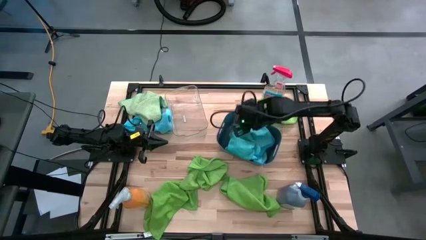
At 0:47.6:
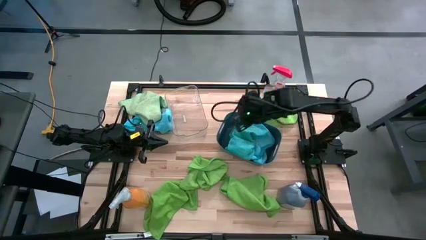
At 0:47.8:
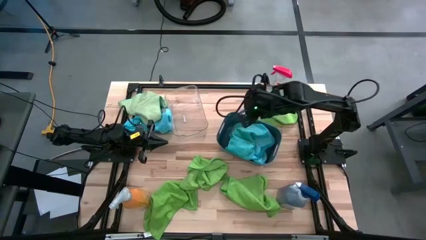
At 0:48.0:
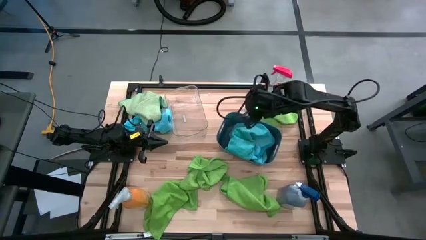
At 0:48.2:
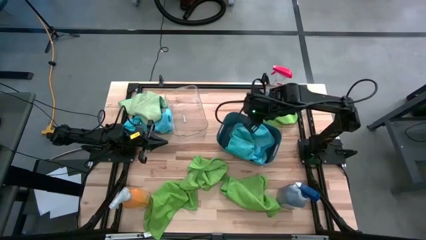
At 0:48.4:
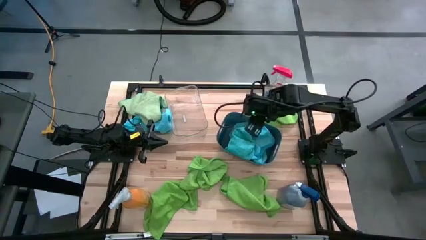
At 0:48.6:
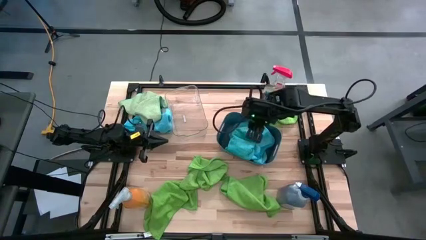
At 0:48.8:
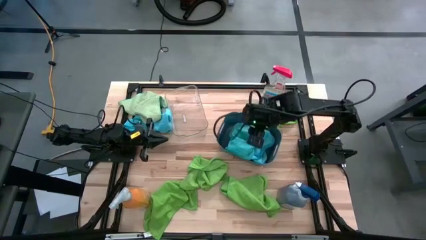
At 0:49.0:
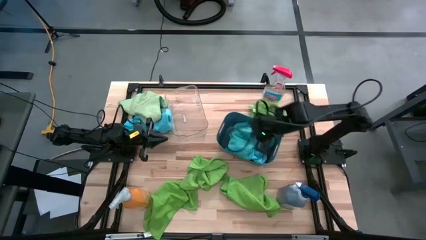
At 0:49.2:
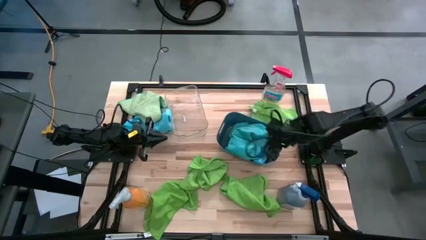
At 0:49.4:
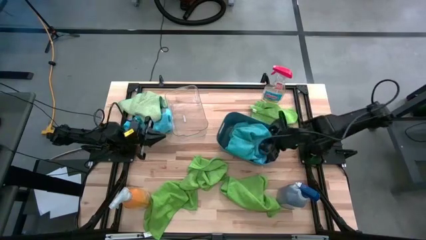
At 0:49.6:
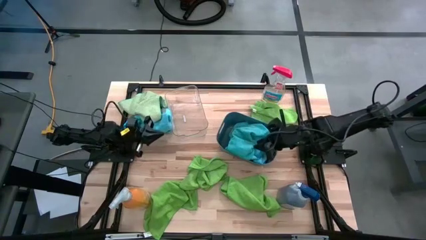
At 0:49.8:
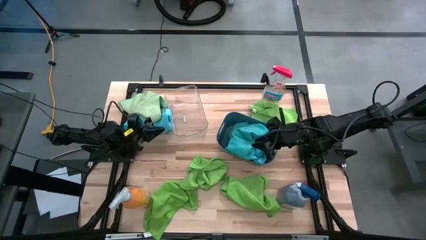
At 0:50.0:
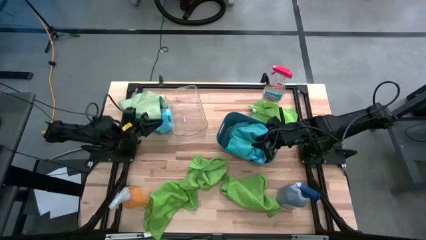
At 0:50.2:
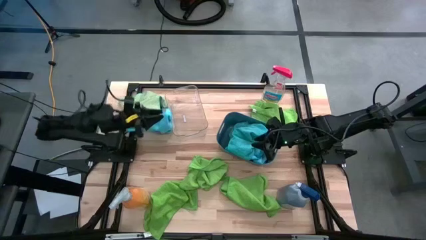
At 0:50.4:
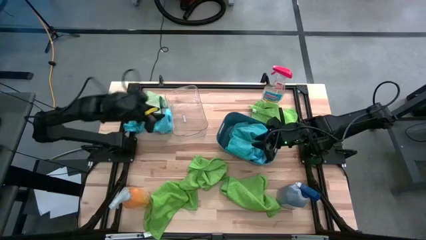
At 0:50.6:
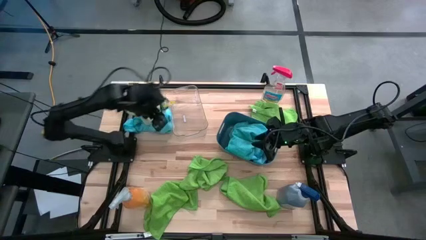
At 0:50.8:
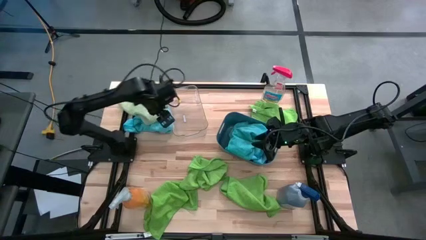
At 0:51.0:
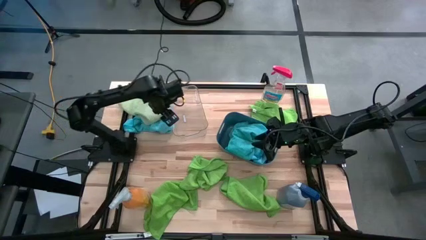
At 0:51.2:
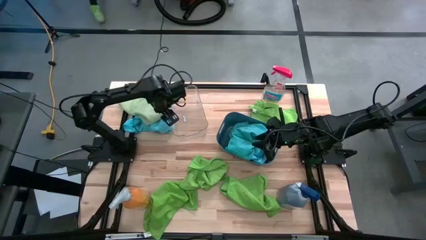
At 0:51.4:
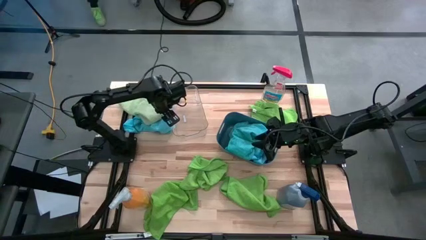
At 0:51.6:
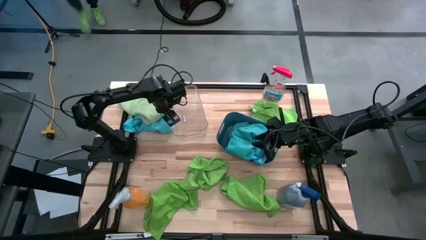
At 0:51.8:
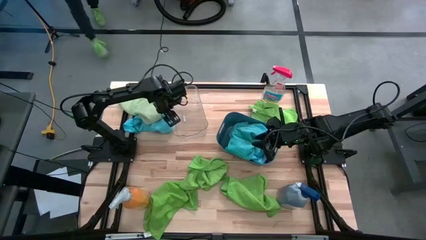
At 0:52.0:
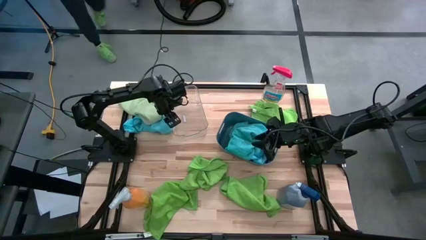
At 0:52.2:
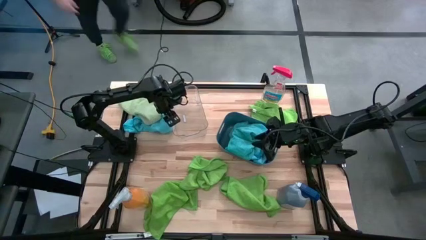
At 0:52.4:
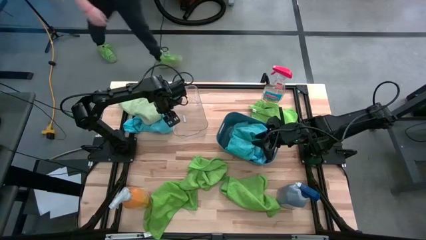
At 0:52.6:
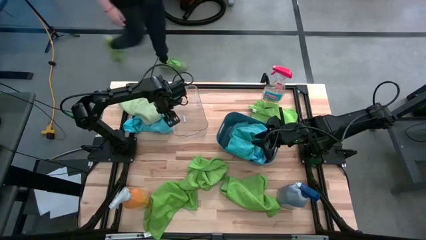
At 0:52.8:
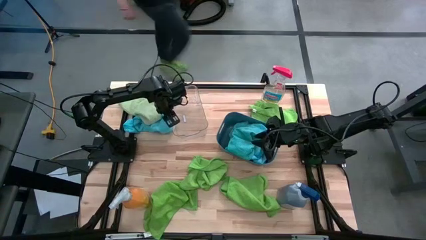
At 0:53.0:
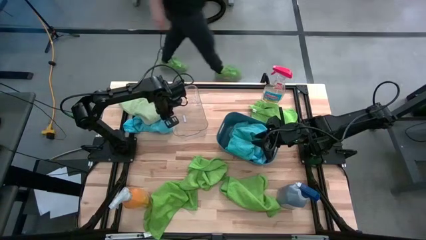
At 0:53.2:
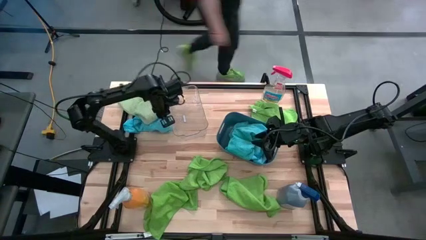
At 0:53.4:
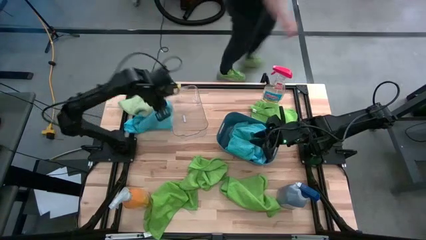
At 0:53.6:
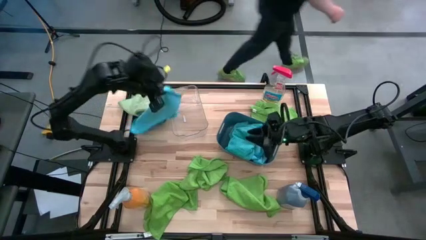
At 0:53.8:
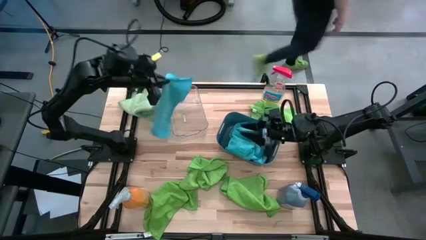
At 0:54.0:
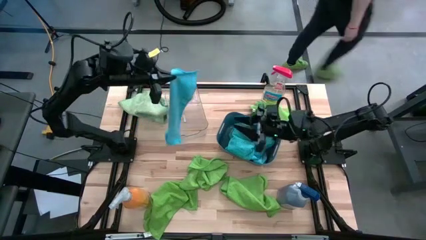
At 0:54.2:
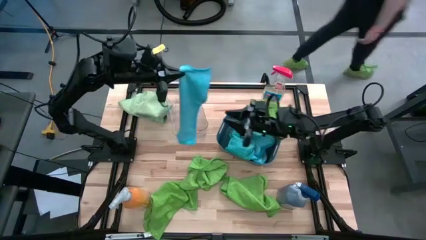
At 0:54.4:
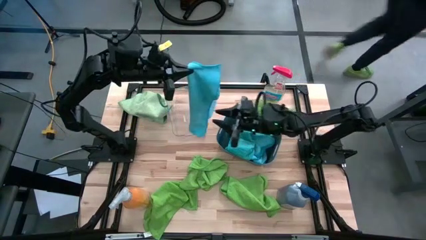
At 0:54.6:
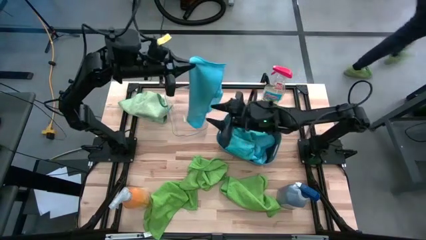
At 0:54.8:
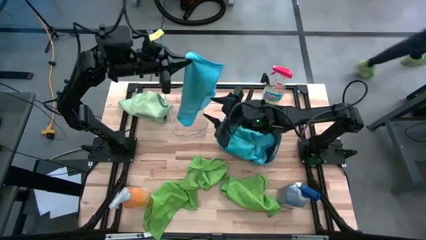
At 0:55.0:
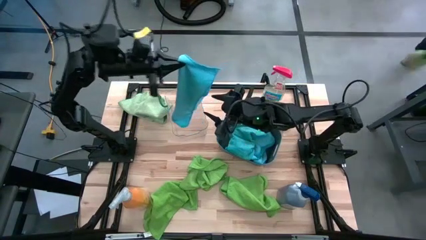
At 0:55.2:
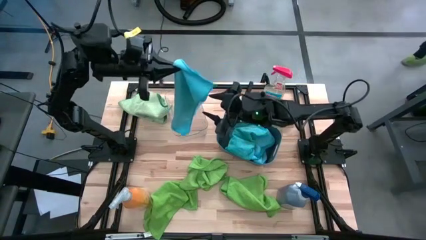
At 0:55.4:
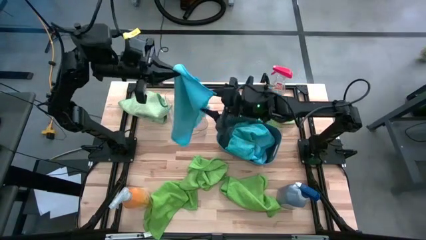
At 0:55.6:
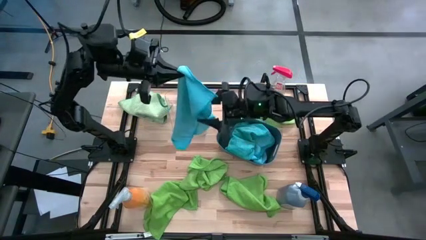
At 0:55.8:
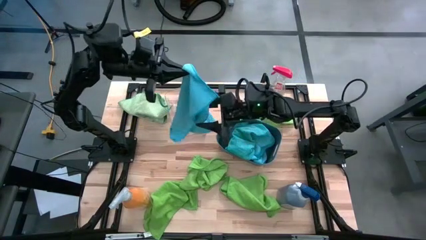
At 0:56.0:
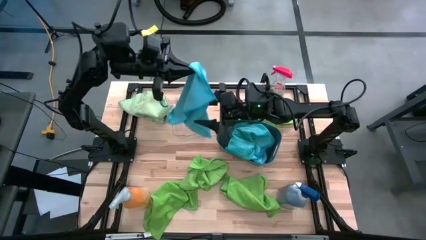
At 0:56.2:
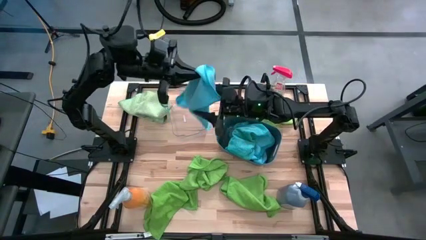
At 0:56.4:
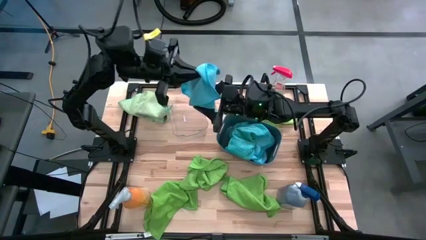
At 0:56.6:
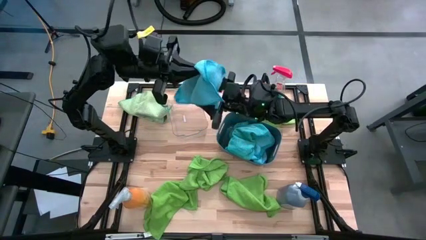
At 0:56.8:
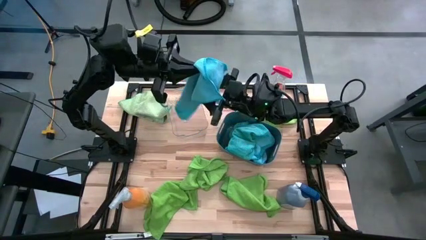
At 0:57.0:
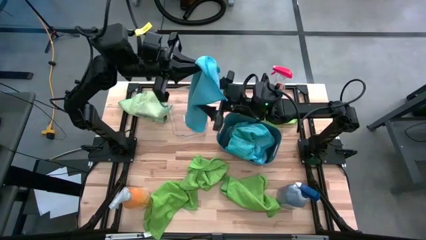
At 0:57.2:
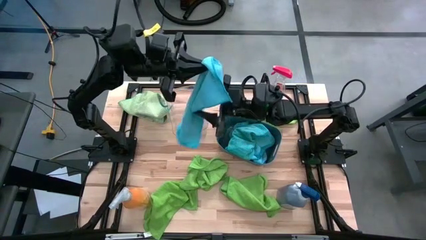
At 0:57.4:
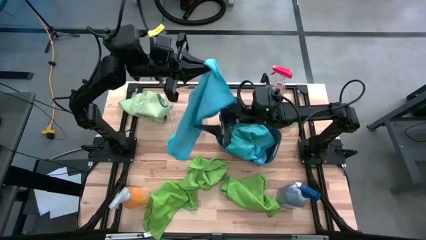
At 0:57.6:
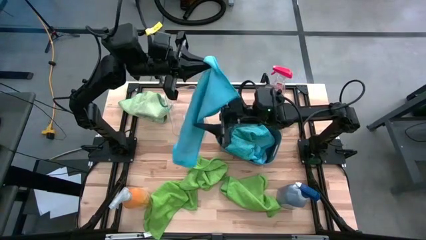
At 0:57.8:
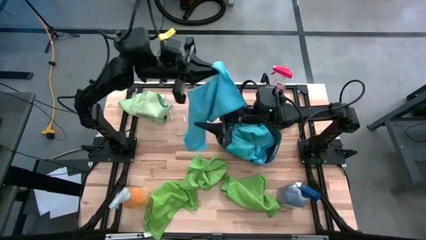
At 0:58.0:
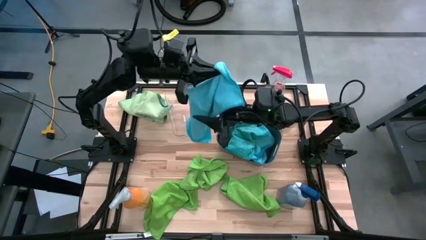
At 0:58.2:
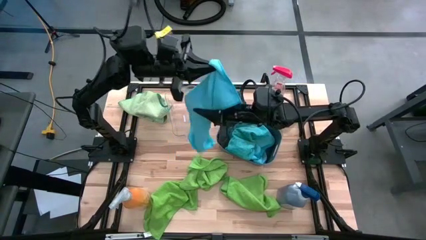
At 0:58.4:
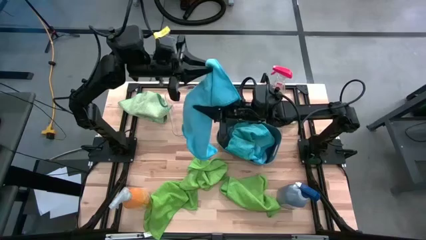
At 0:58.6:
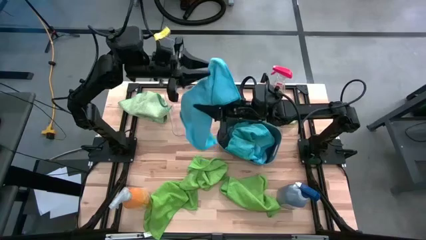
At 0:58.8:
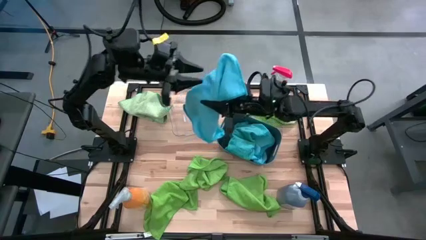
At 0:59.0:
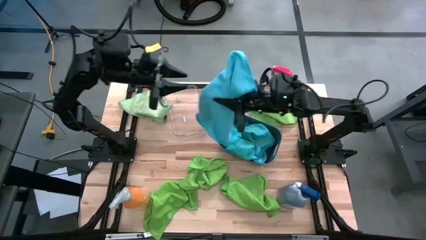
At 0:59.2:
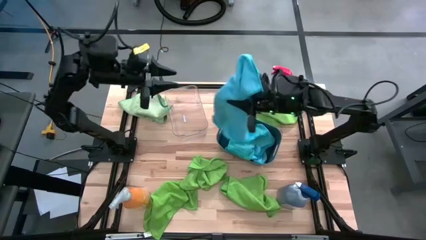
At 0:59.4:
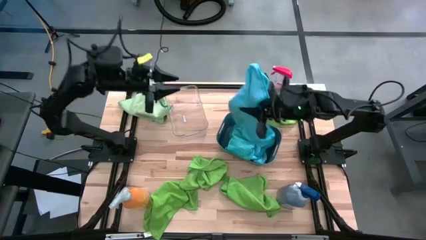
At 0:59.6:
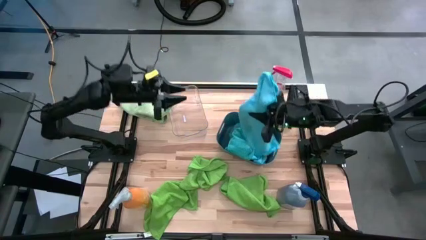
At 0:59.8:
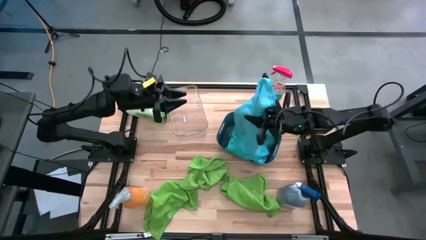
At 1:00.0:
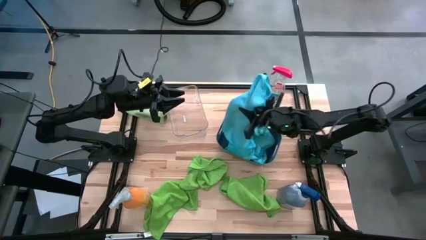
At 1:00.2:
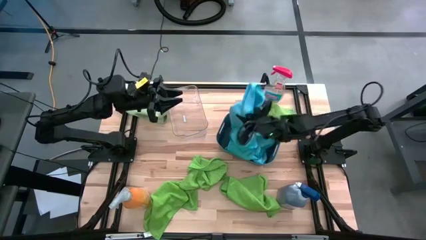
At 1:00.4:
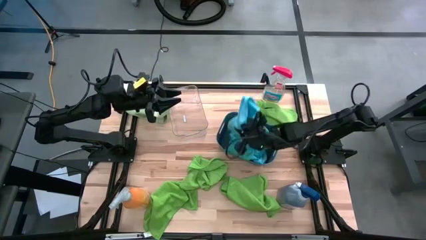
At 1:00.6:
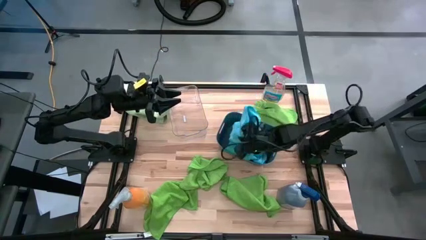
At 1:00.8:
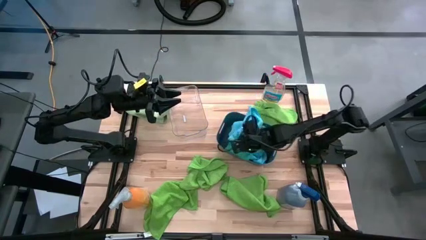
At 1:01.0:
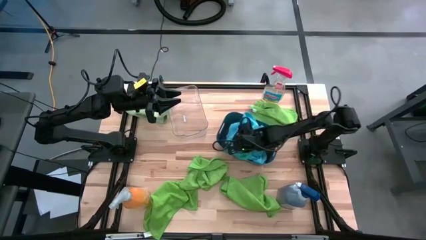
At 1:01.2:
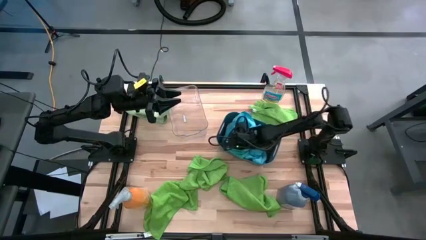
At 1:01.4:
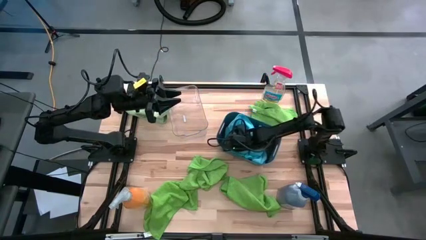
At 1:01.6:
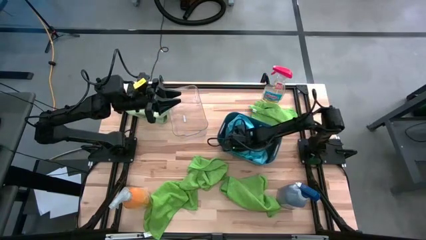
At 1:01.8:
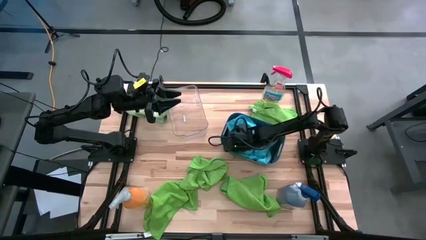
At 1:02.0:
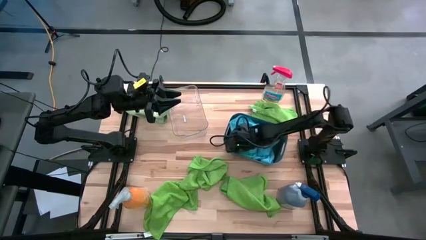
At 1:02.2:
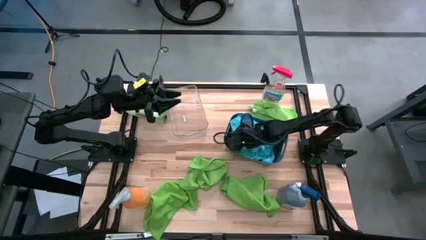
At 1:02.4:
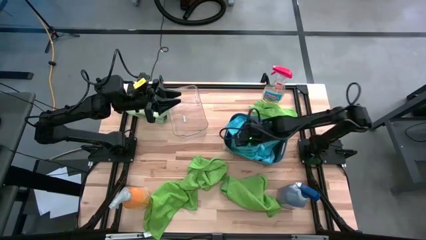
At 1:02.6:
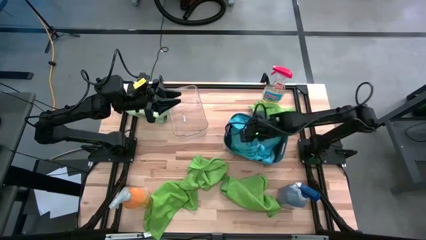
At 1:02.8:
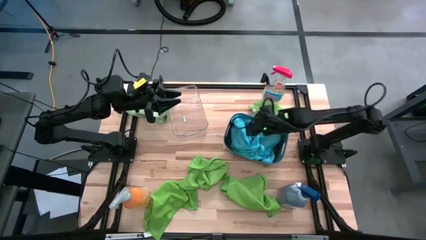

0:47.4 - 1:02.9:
Task: Sort microfiber towel by color & place in baskets
Put the blue towel into the blue bin
